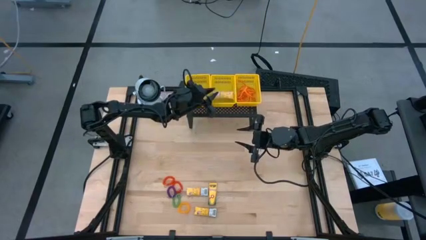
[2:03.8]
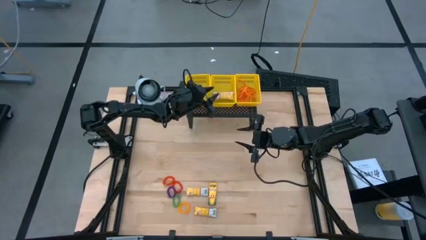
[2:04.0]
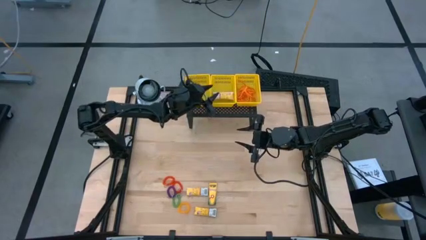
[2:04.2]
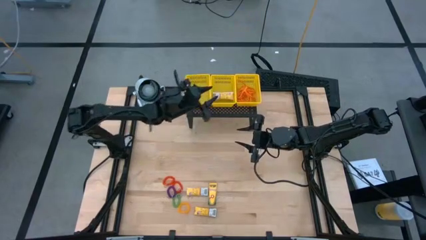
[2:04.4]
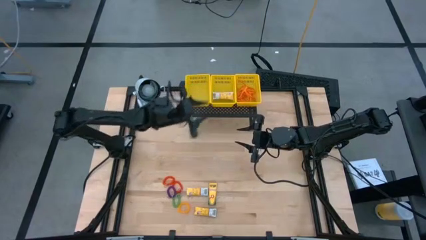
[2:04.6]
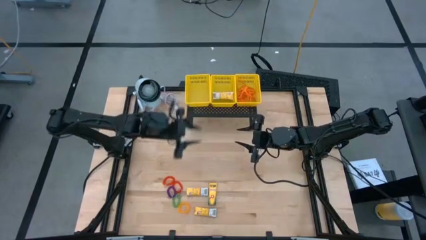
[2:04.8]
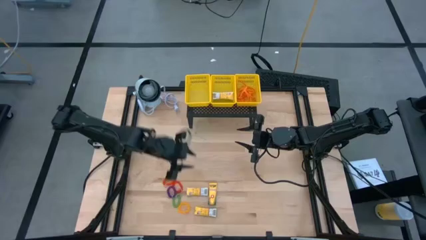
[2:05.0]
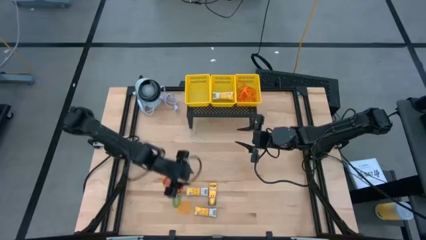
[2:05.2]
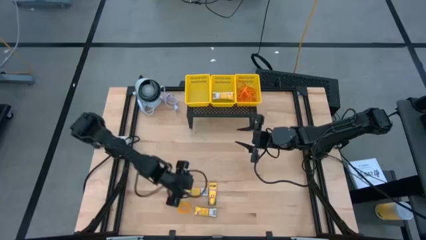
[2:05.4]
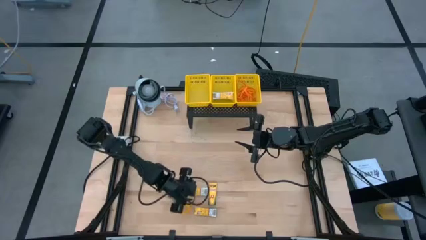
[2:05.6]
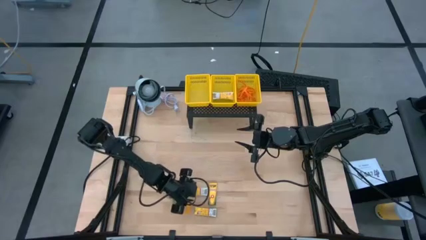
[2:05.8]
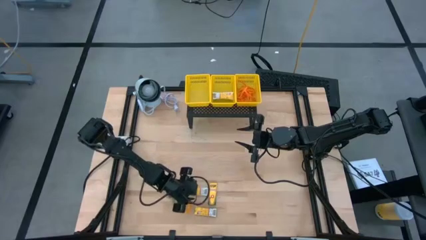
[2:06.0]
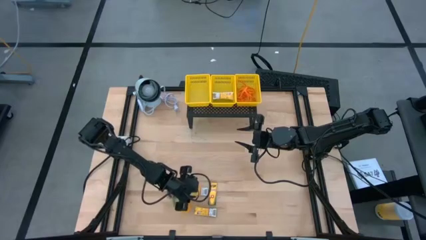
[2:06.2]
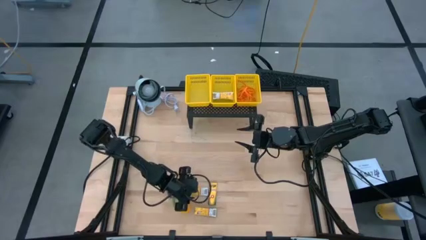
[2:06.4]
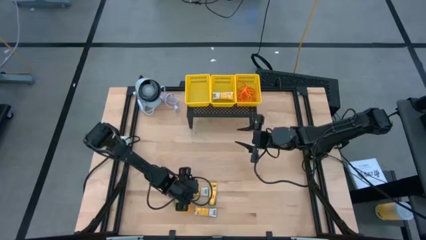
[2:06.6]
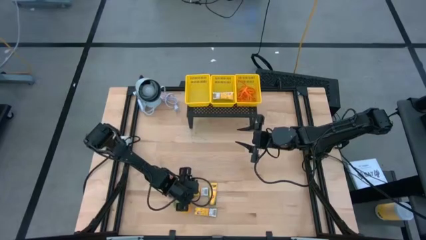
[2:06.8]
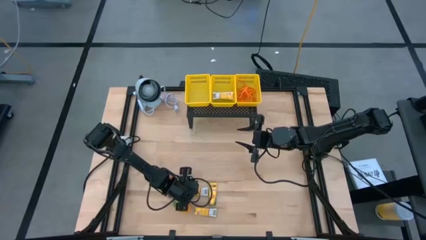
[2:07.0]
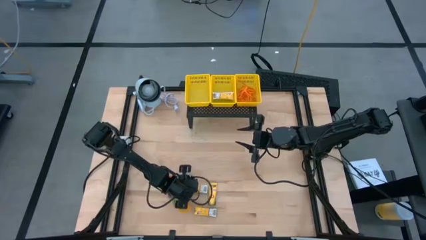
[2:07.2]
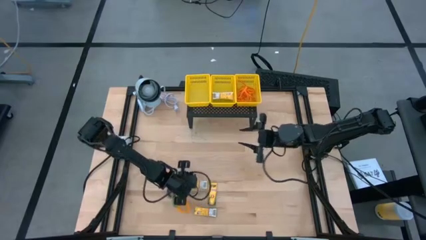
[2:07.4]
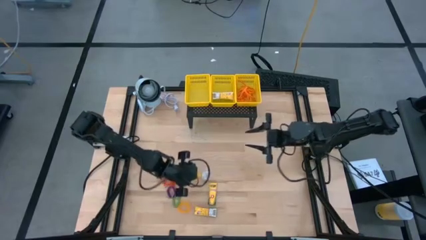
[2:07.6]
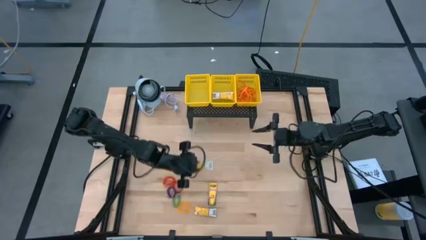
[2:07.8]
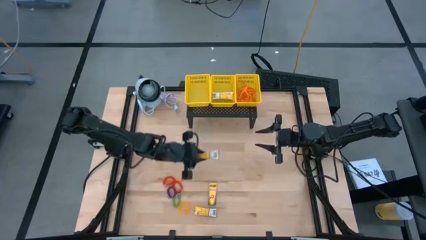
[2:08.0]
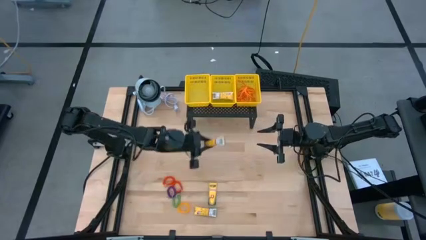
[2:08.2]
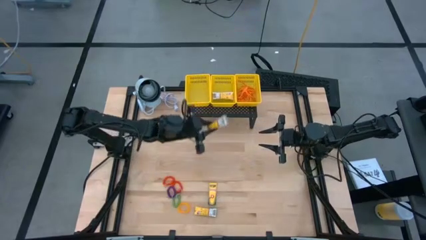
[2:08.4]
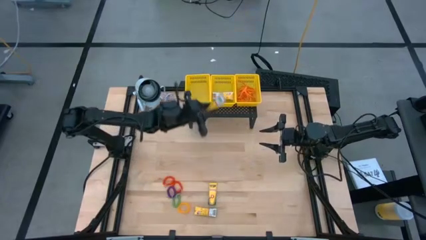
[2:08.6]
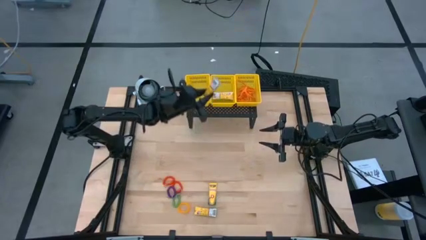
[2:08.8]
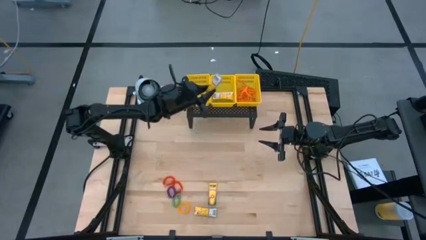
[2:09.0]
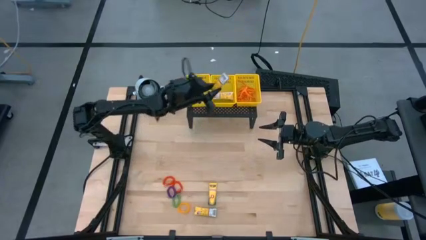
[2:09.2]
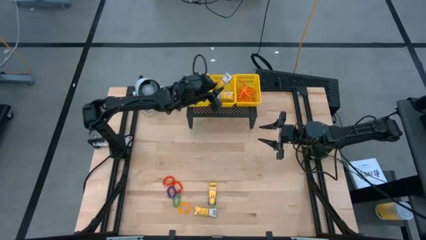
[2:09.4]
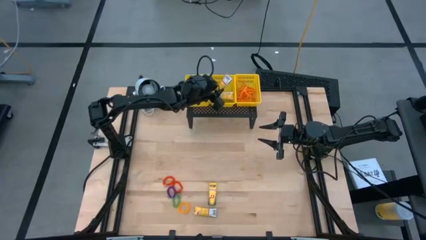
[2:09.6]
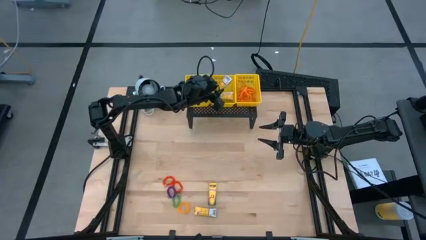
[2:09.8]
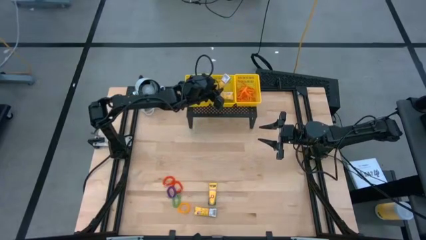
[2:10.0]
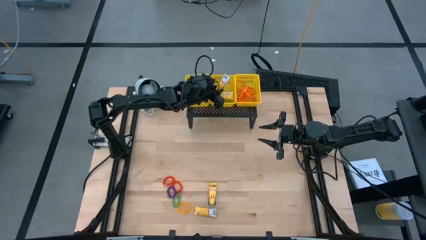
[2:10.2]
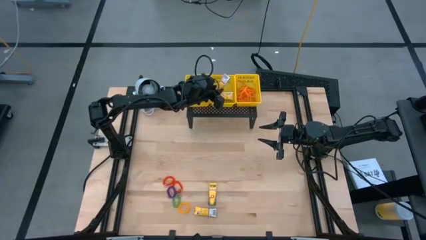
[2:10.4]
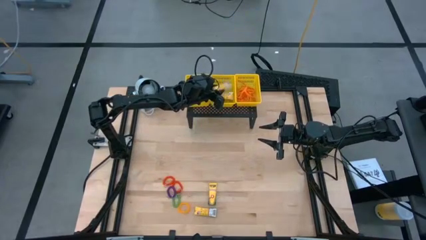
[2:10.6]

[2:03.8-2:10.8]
Task: Pick & Place Office Desk Supplies
Put the crayons box into the middle yellow bin on the shelf

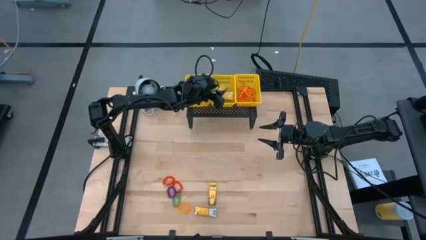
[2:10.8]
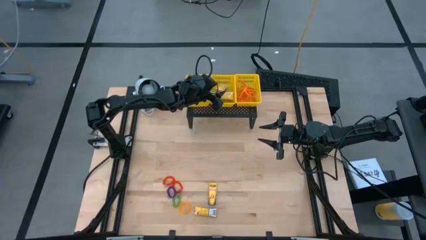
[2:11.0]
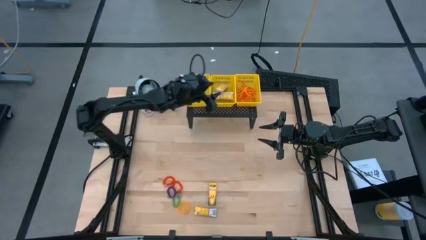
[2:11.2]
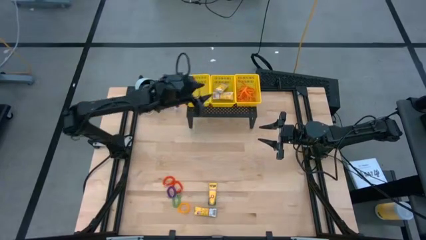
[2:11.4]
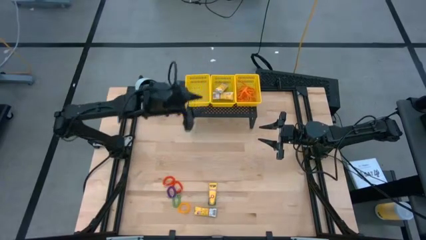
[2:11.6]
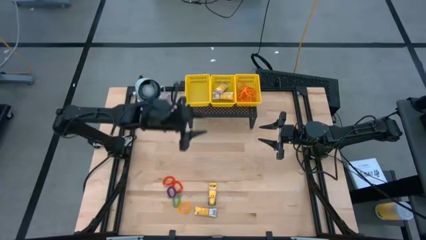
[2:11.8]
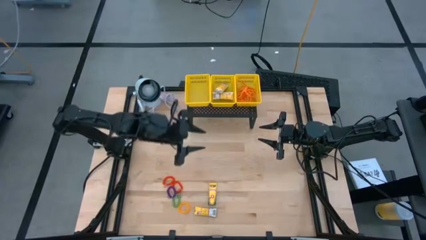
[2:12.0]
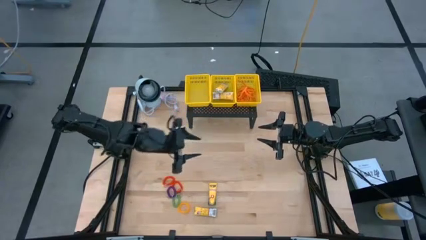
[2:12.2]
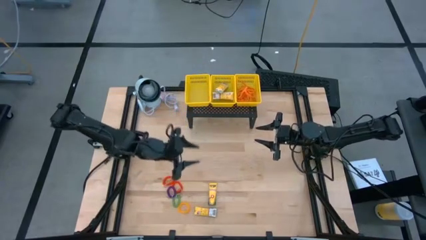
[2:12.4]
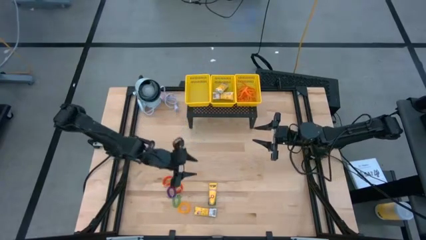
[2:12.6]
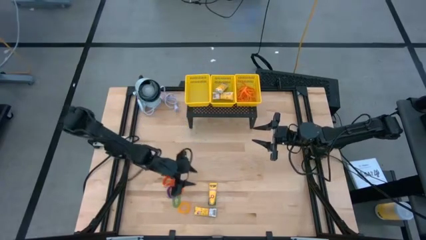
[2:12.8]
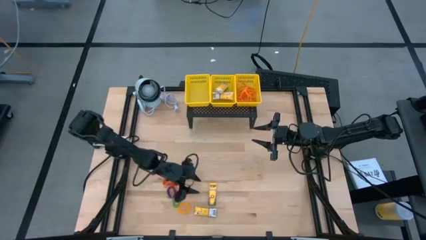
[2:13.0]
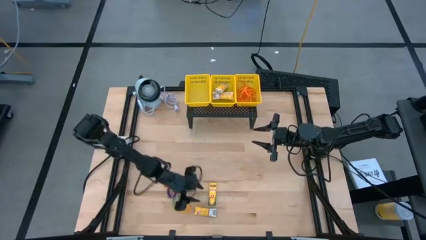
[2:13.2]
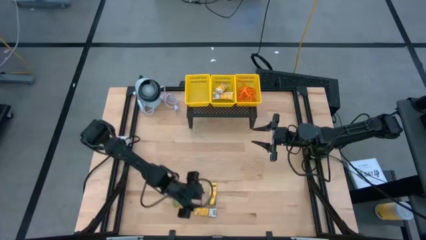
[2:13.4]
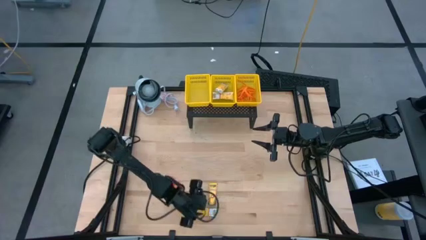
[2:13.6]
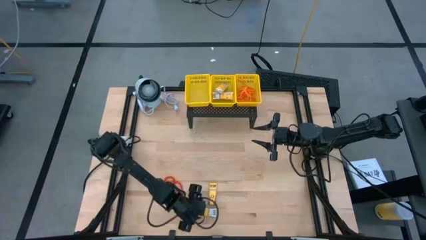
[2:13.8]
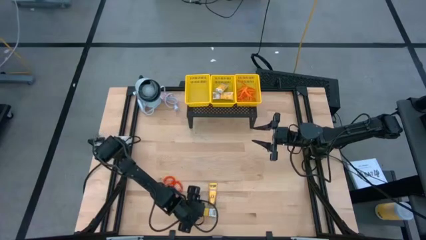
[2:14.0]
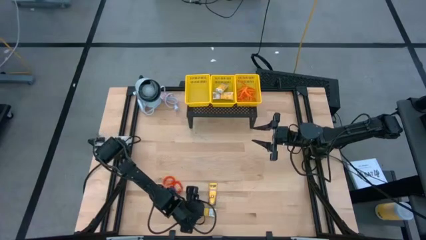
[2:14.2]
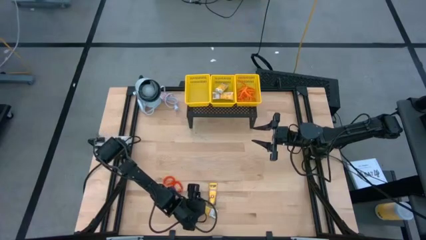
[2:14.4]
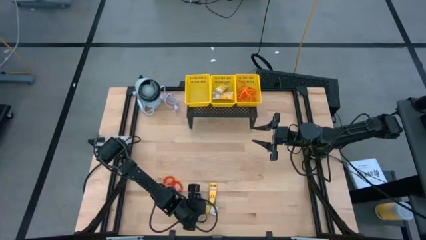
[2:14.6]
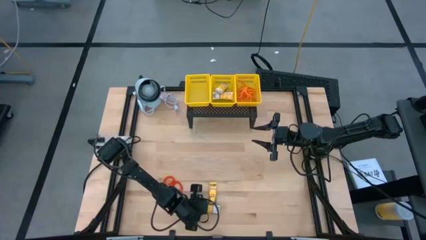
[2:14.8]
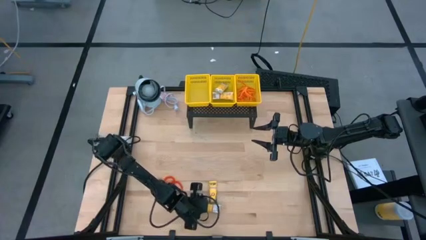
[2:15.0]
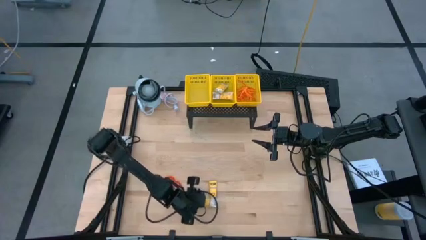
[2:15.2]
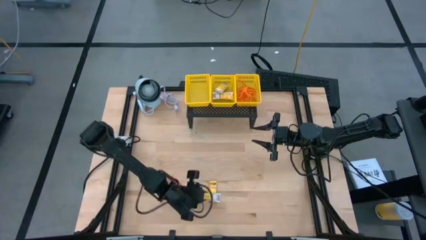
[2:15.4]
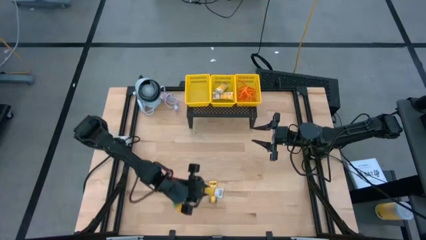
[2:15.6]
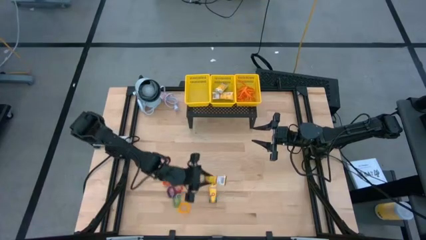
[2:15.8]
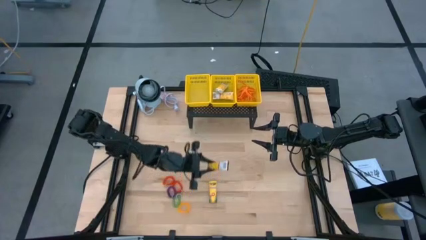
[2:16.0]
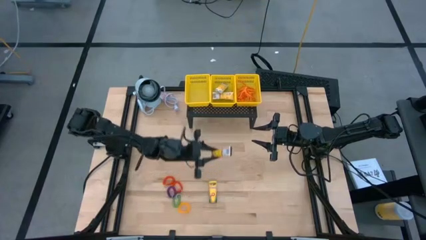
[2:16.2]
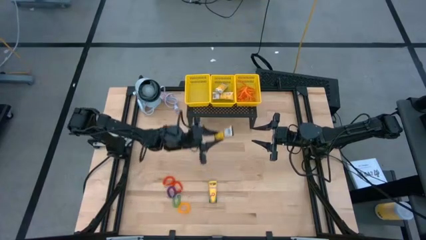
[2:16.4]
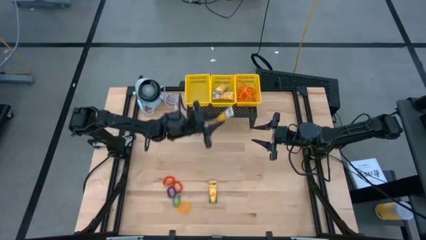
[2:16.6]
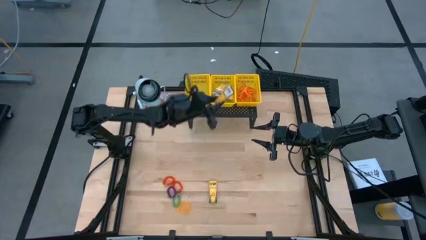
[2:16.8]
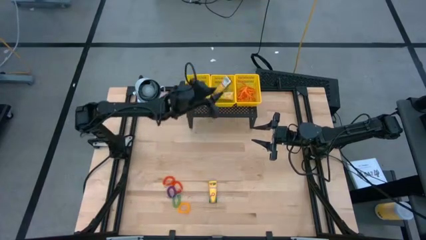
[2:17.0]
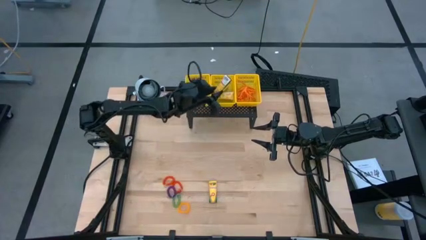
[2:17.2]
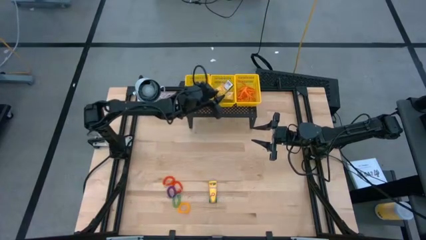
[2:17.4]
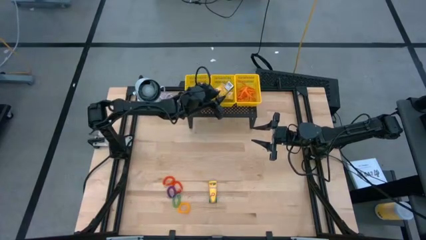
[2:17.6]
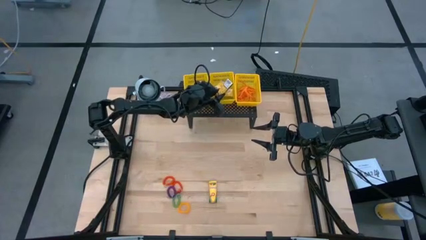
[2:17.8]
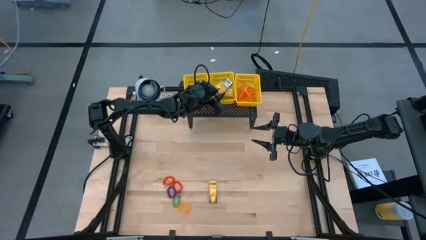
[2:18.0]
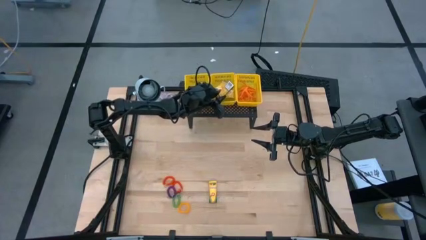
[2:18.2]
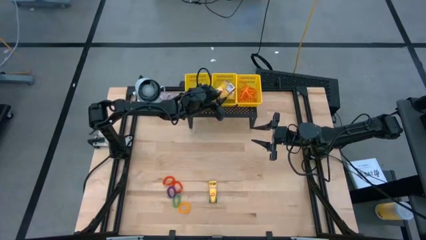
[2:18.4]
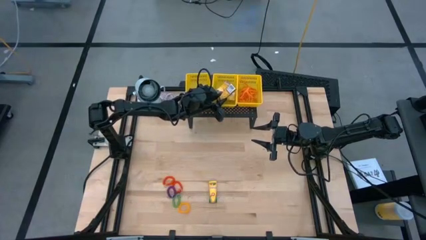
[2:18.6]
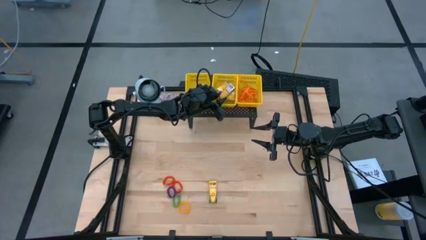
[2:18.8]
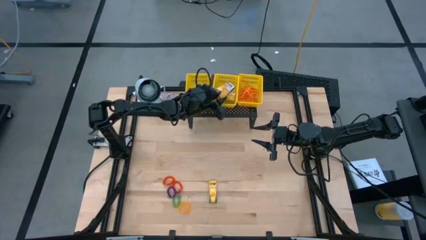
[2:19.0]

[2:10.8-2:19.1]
Put the crayons box into the middle yellow bin on the shelf

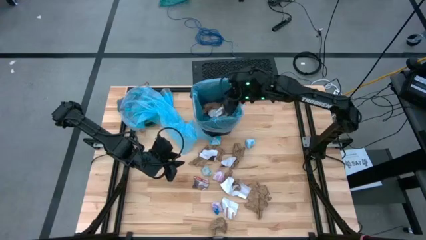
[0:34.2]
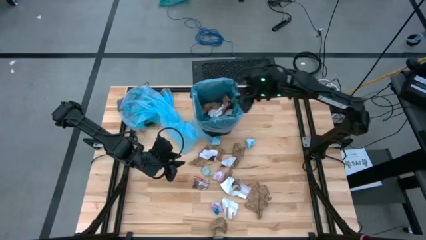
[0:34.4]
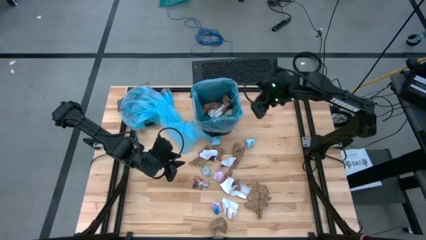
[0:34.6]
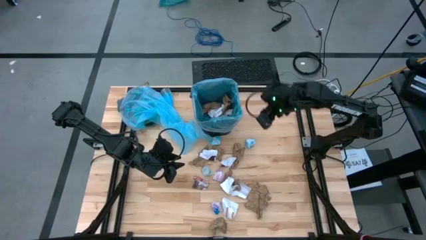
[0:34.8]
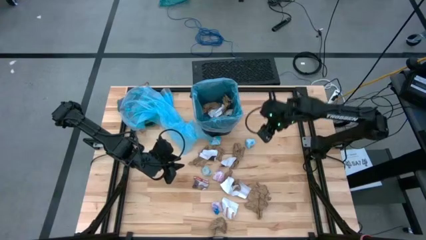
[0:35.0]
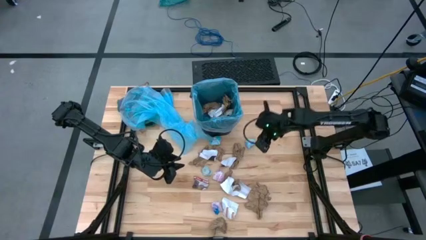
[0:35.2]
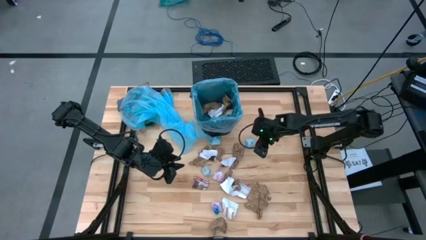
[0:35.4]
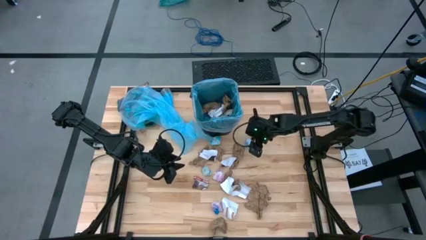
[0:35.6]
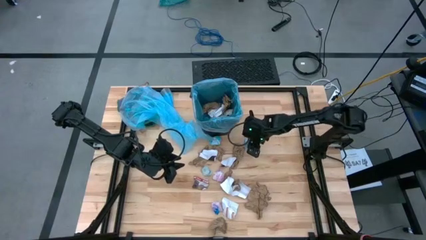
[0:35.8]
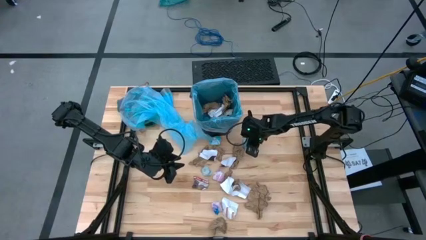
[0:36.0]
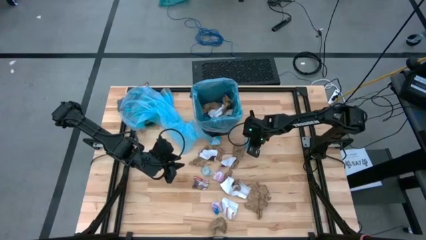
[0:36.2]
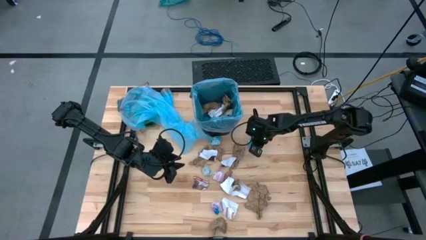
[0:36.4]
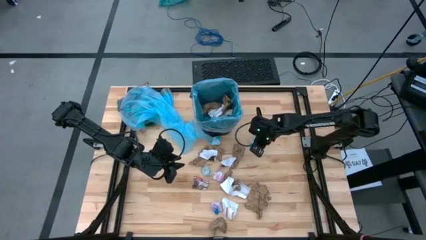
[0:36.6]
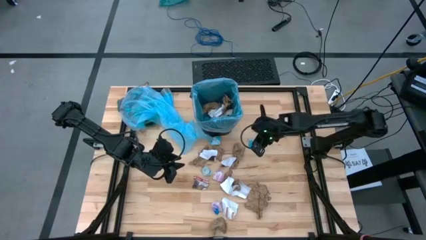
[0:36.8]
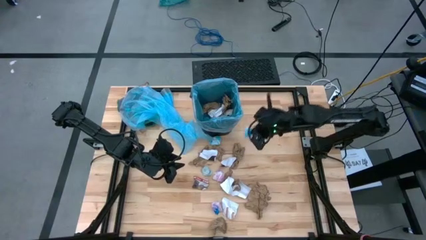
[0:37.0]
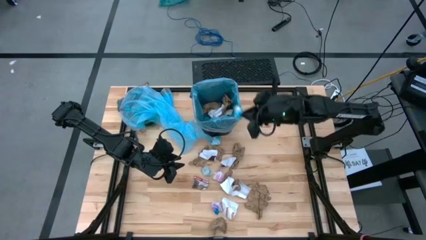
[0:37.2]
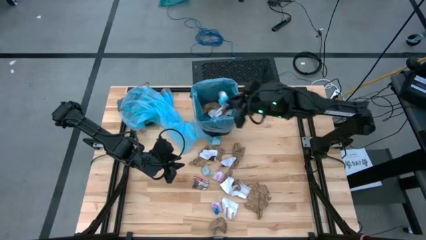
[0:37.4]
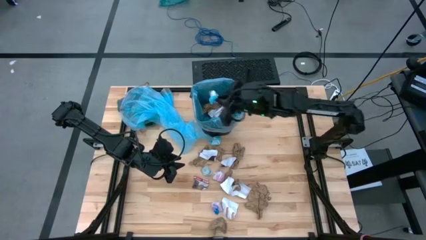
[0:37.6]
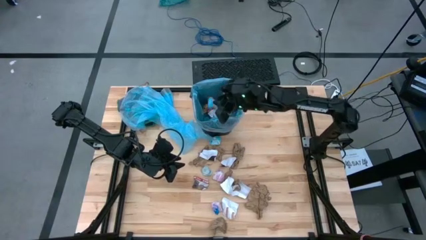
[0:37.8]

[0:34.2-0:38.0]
Task: place trash/remove bag and relplace
Put the blue crumpled plastic bag into the trash bin
